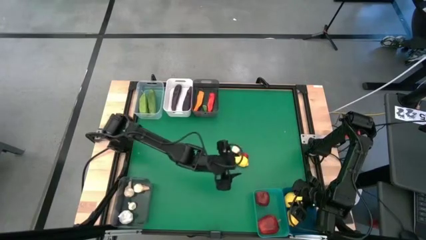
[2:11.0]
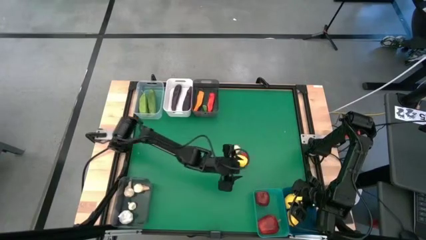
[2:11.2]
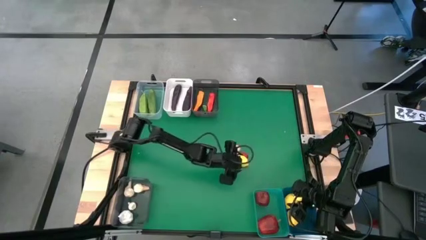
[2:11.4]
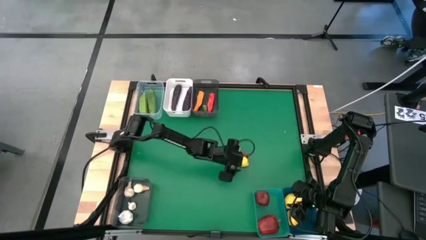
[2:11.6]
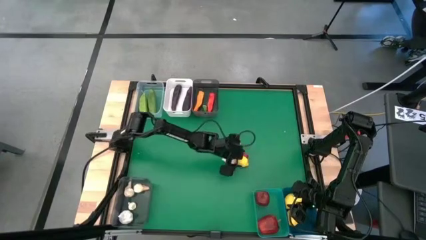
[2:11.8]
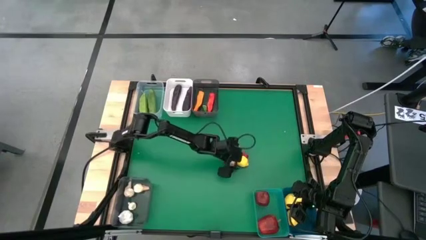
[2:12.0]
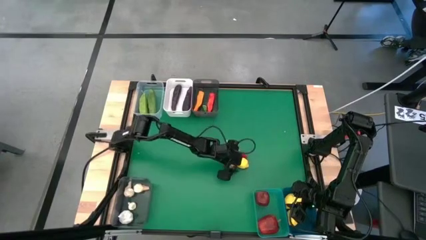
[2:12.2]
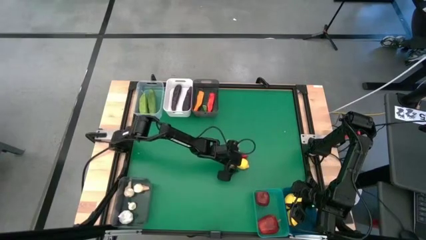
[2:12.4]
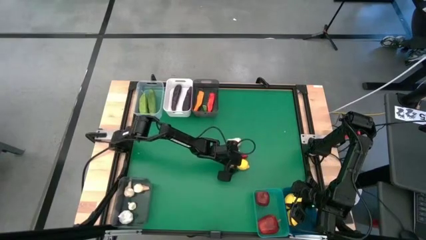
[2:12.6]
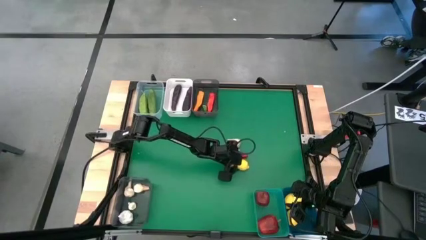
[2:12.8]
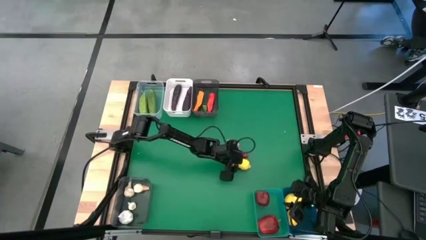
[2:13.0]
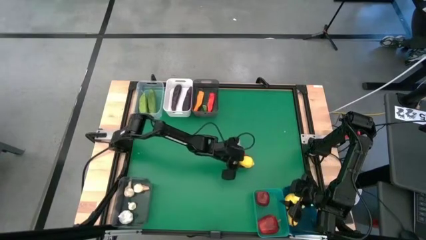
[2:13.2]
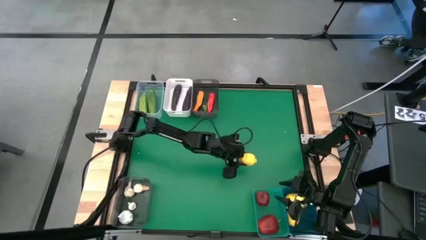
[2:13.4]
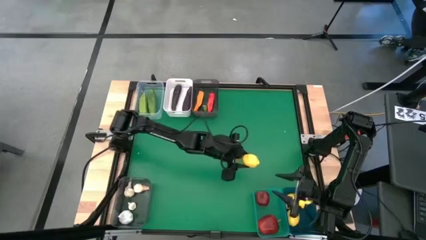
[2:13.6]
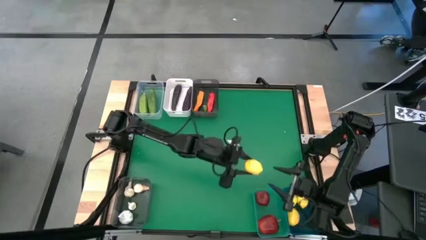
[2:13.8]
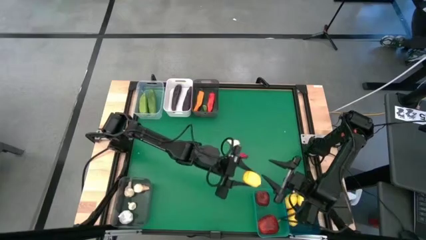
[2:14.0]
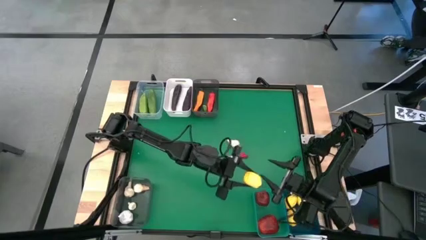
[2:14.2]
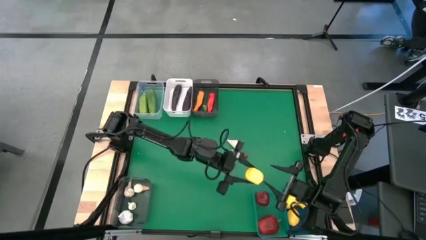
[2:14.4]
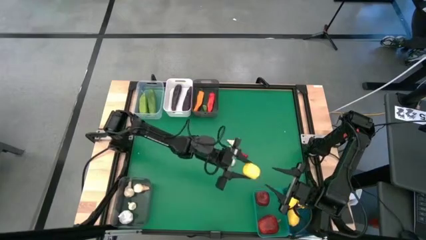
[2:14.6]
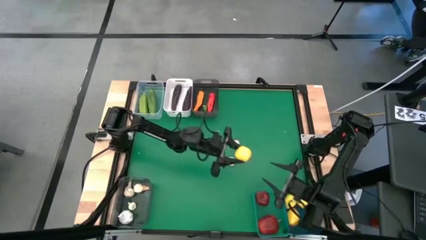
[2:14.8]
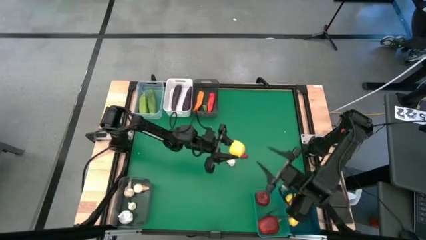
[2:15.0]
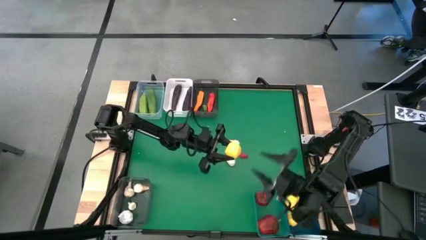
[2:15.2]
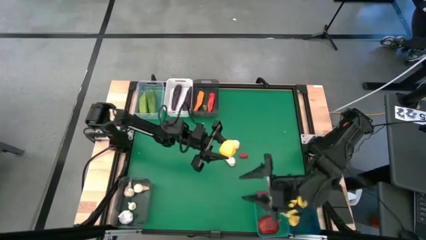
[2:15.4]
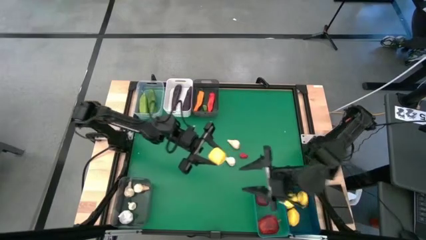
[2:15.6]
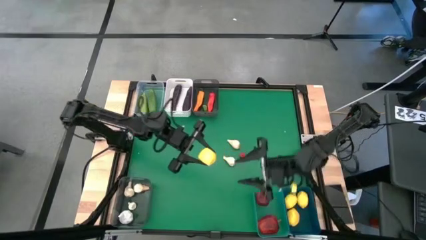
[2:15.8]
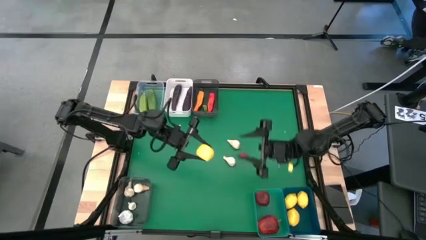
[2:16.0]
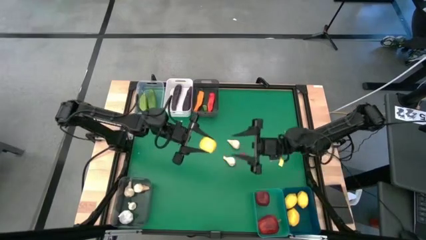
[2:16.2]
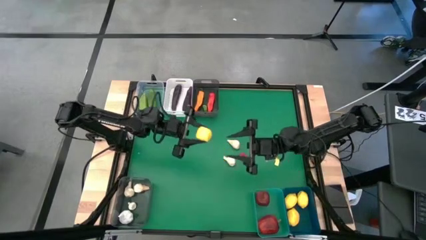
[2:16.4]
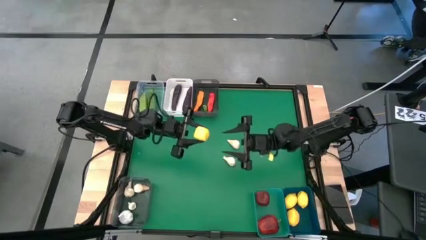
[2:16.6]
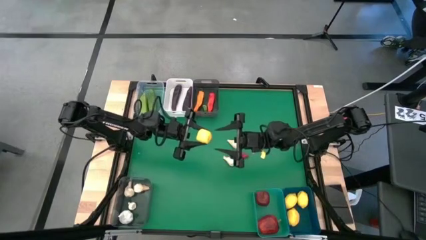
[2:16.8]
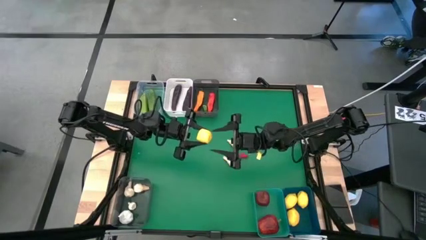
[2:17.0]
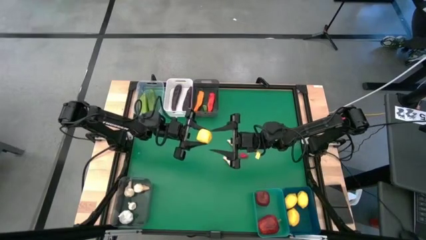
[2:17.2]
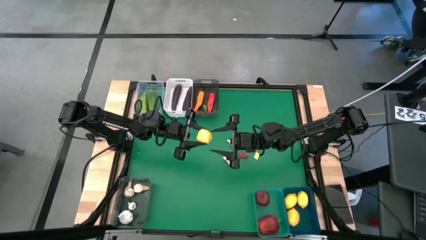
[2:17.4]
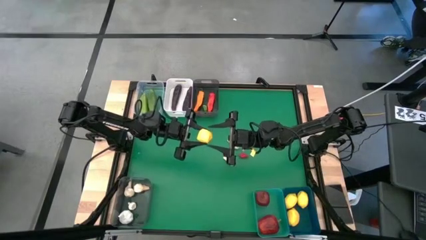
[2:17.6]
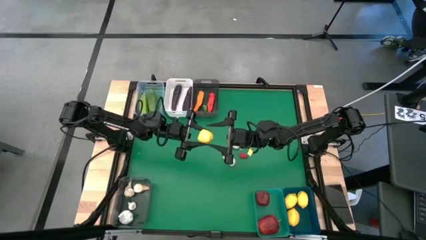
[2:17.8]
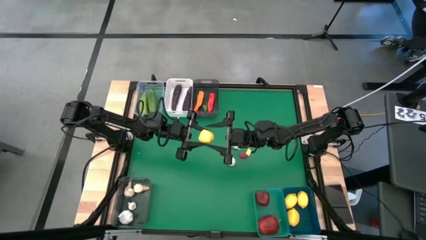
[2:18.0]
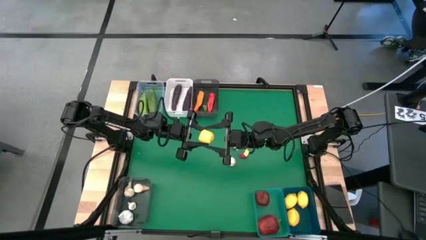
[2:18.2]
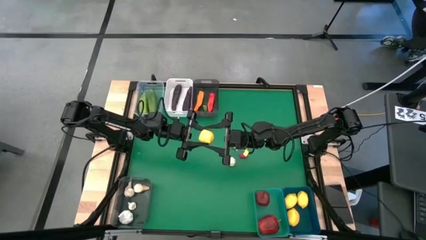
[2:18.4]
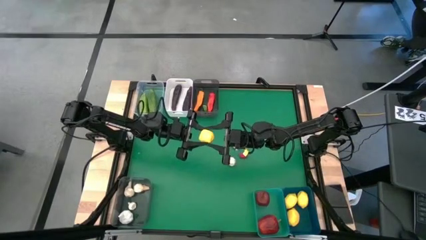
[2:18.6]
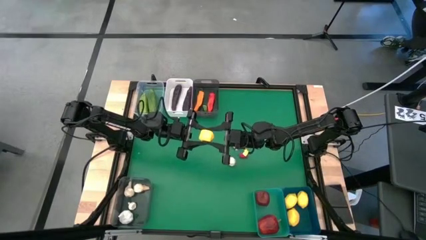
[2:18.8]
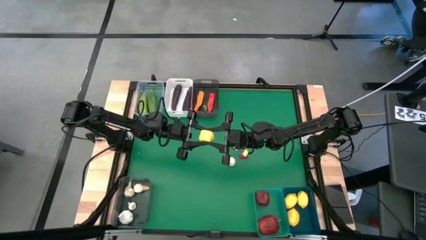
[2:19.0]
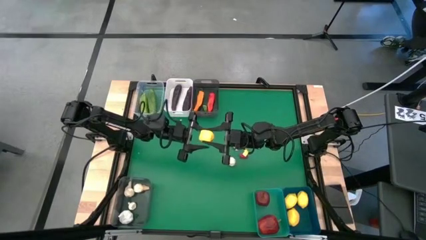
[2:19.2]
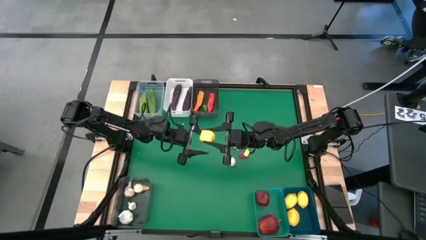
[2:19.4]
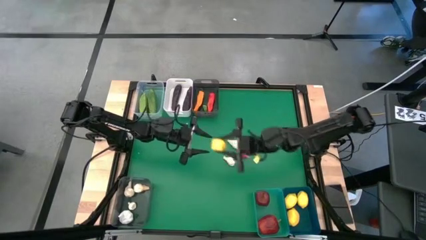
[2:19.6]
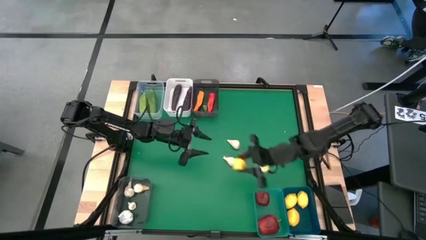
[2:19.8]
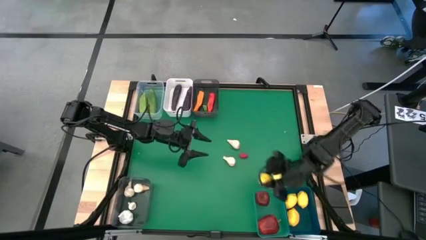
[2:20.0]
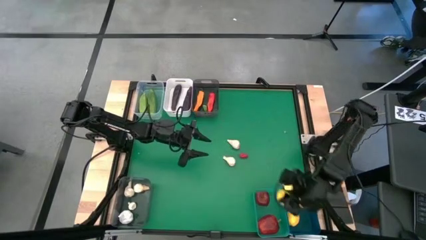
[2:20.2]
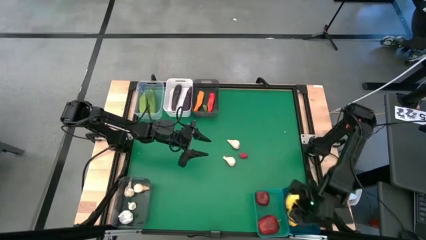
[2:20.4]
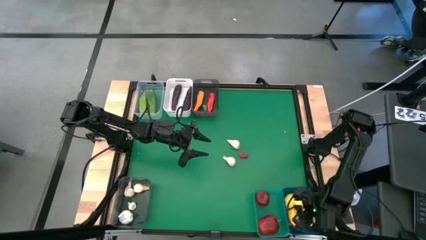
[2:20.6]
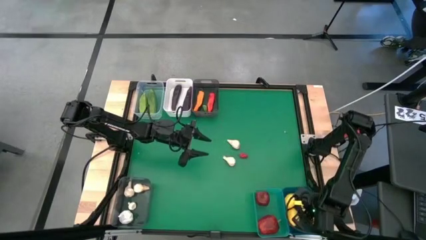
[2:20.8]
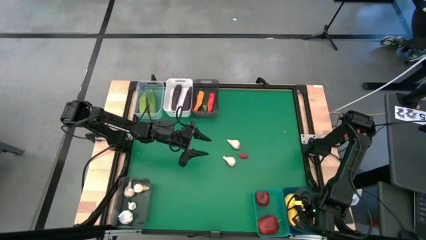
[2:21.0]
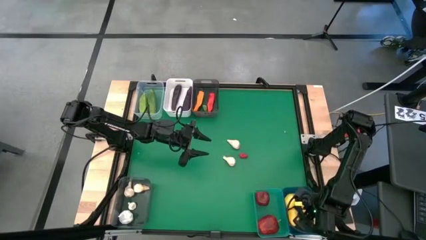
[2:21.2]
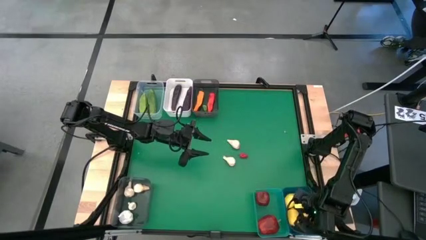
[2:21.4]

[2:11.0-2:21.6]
Task: Sort produce into baskets
Put the yellow lemon into the blue bin

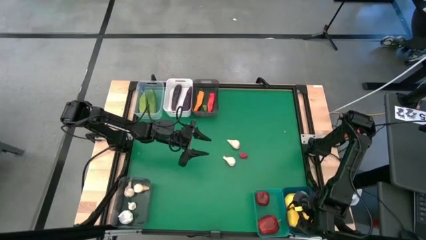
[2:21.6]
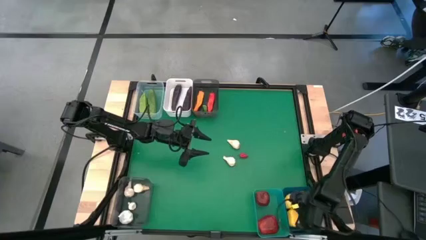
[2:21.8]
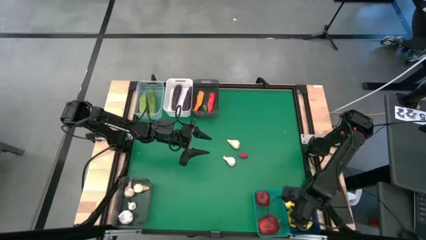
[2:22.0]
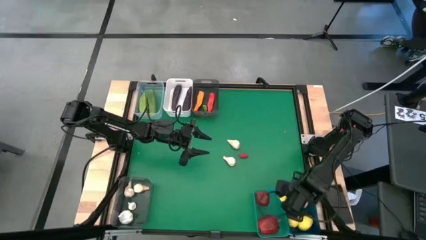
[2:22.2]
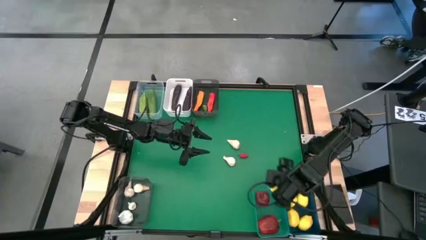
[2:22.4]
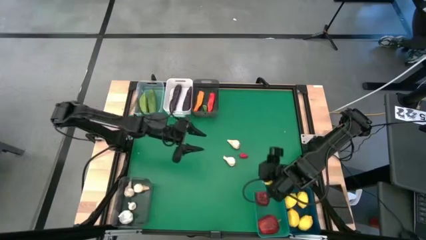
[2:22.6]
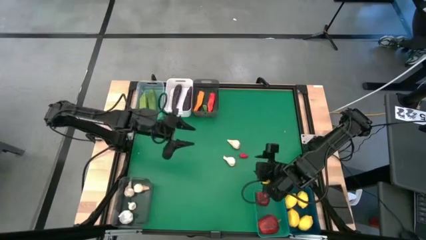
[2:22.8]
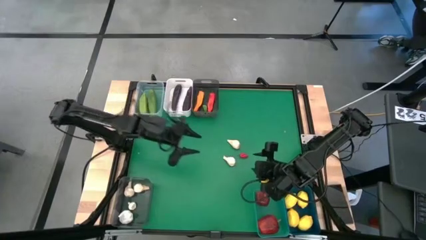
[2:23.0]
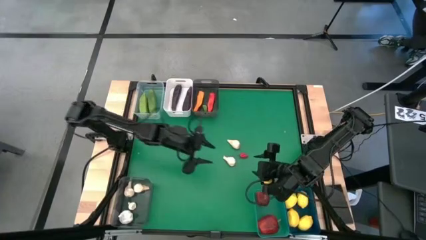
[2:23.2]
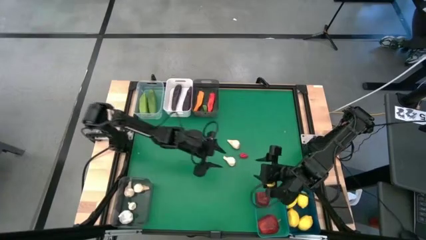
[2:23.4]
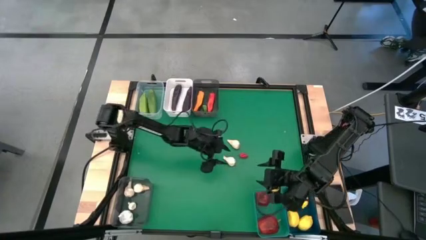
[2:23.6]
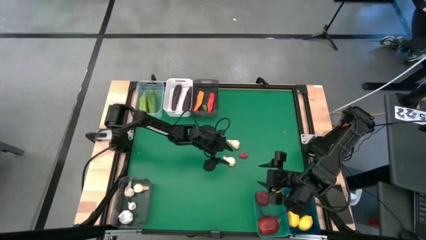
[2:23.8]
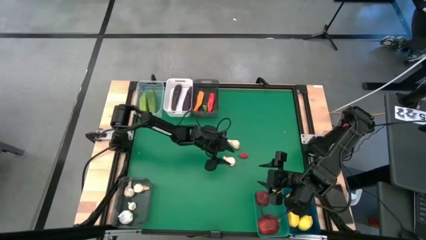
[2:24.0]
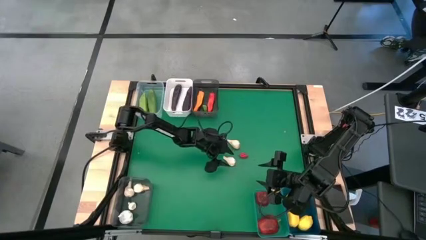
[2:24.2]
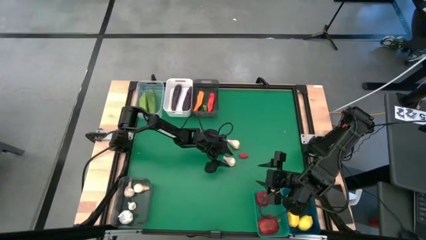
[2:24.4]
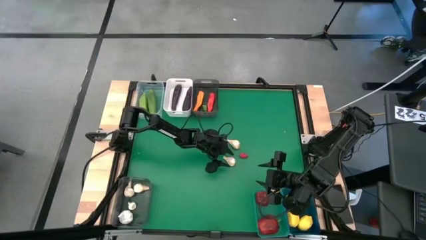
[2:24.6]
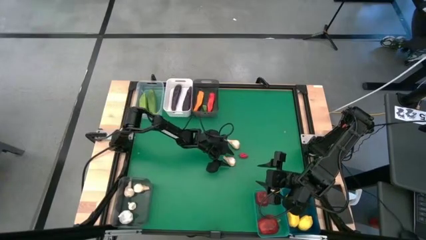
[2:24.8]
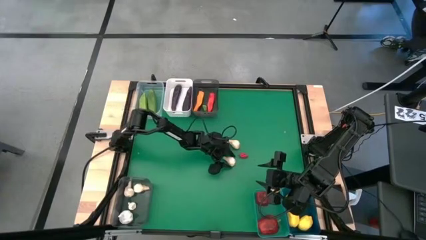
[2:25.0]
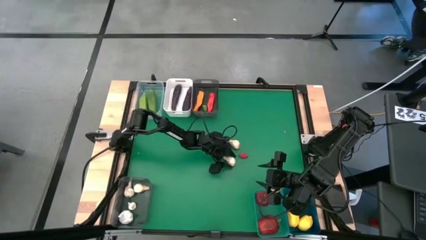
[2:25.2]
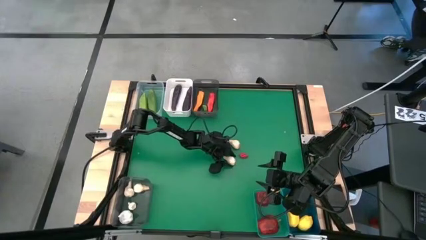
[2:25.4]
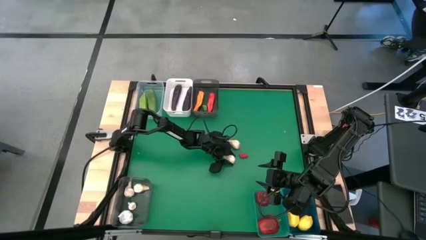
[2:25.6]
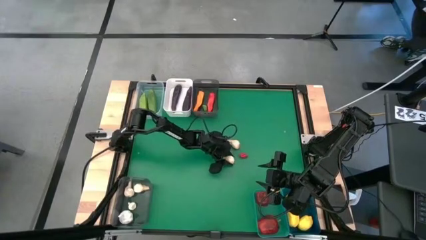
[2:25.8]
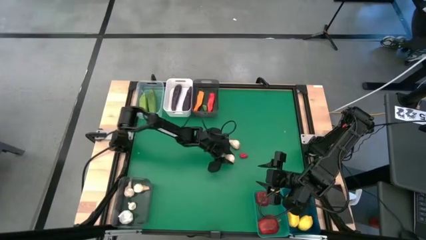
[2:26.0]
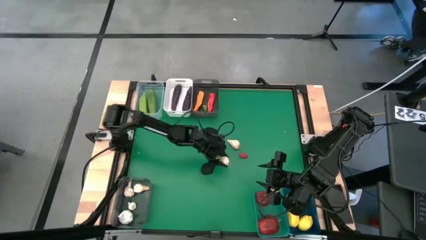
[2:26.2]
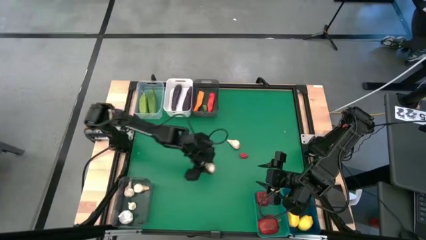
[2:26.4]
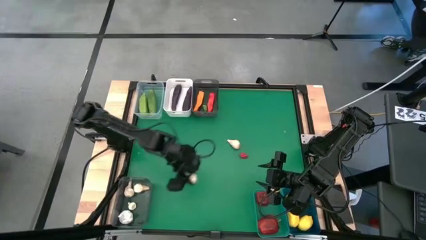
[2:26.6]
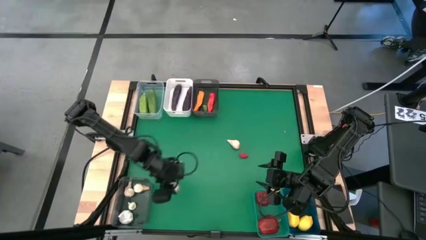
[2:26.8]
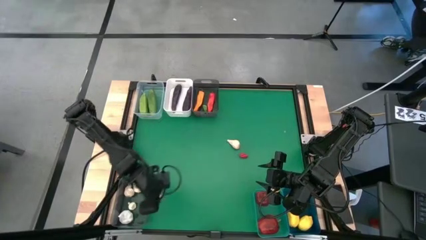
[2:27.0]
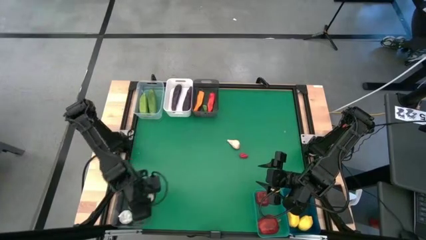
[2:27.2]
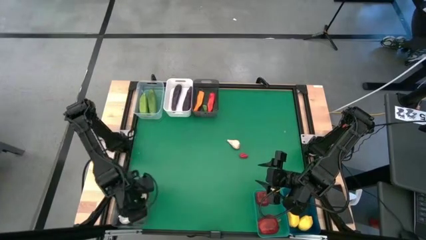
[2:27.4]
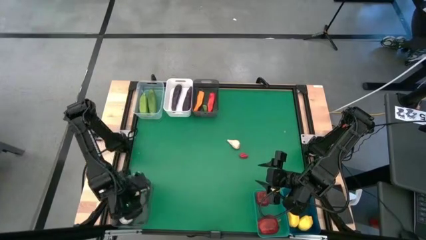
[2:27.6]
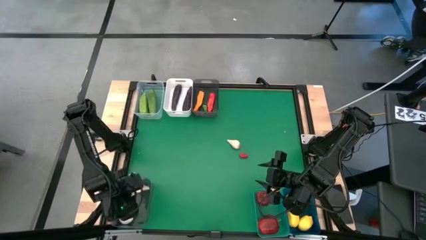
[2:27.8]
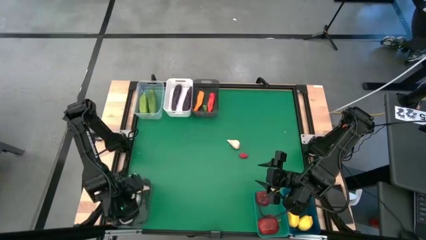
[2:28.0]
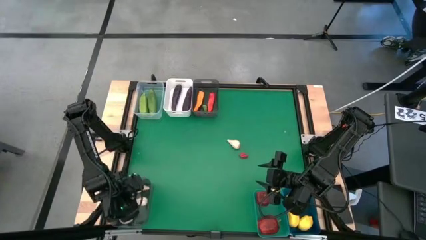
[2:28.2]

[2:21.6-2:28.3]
Put the white garlic into the bottom black bin
